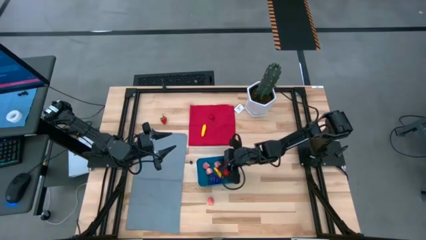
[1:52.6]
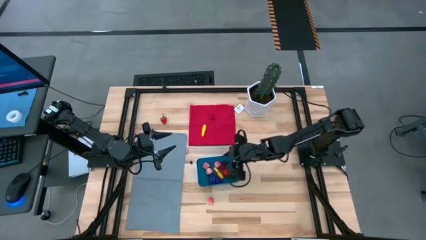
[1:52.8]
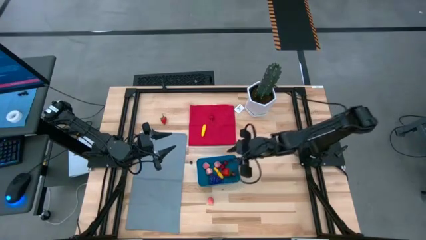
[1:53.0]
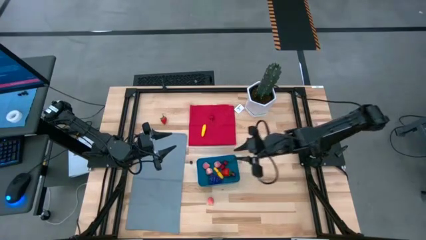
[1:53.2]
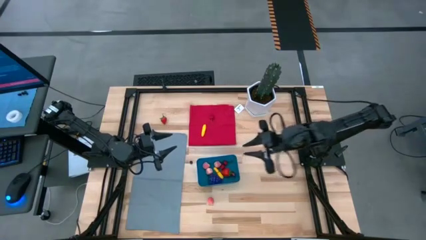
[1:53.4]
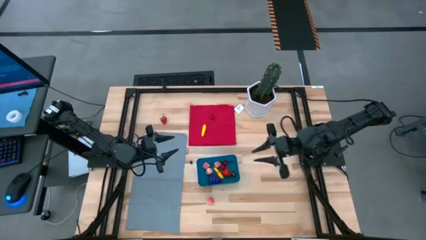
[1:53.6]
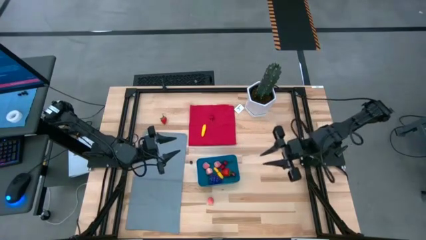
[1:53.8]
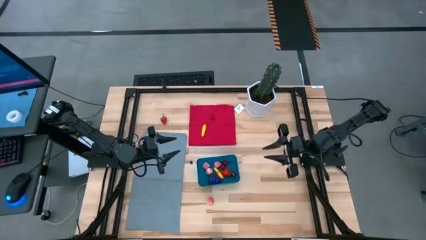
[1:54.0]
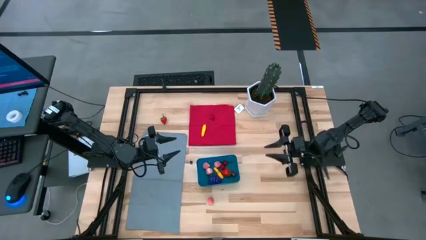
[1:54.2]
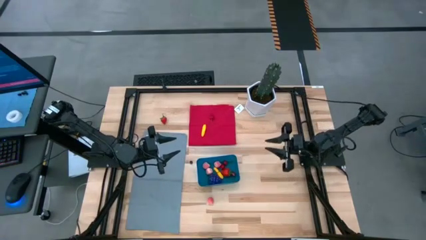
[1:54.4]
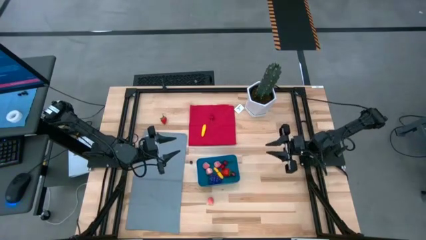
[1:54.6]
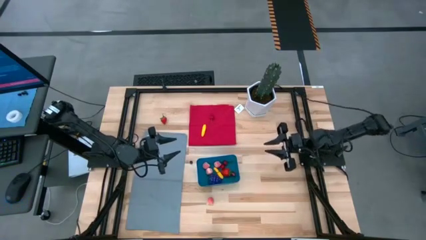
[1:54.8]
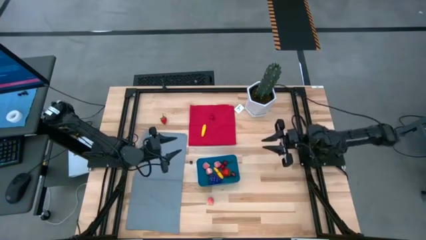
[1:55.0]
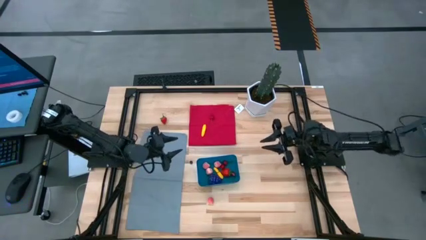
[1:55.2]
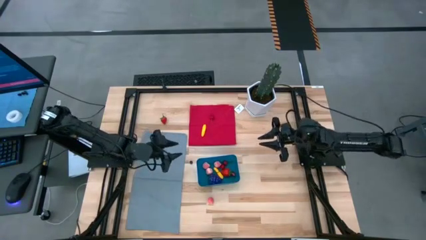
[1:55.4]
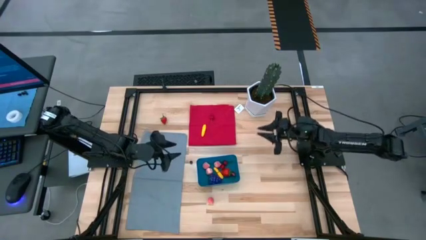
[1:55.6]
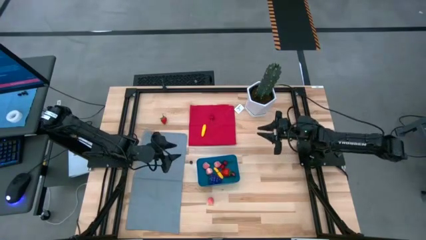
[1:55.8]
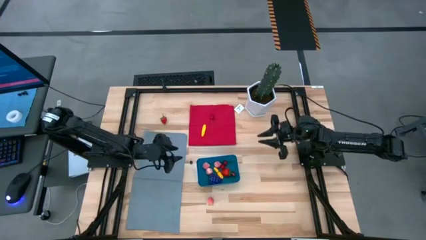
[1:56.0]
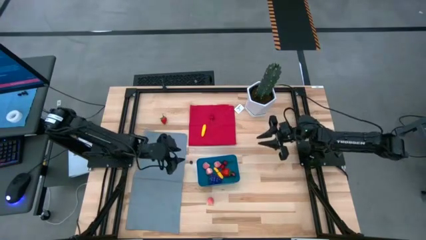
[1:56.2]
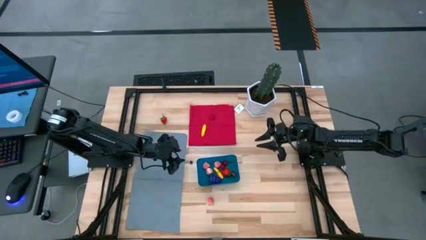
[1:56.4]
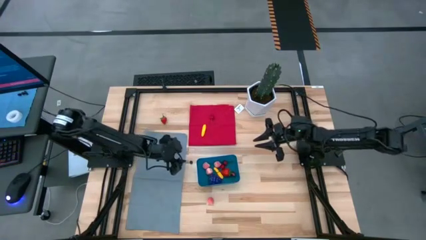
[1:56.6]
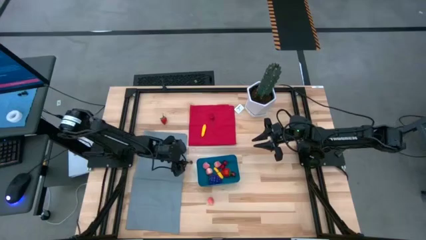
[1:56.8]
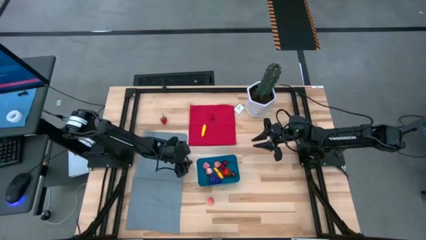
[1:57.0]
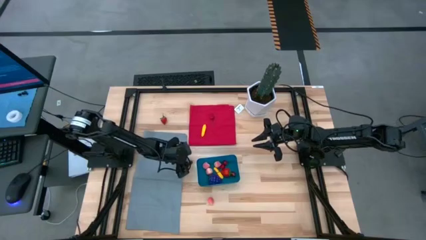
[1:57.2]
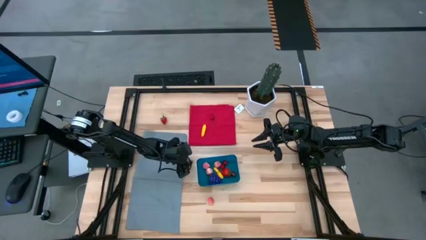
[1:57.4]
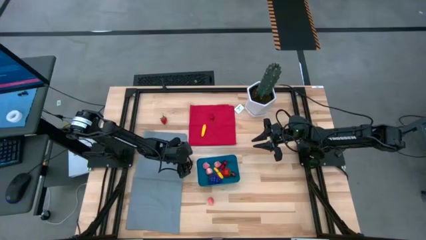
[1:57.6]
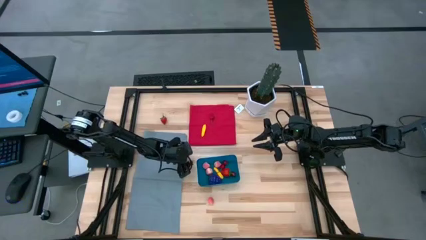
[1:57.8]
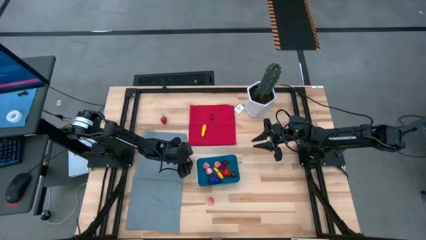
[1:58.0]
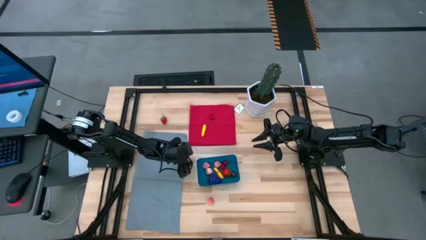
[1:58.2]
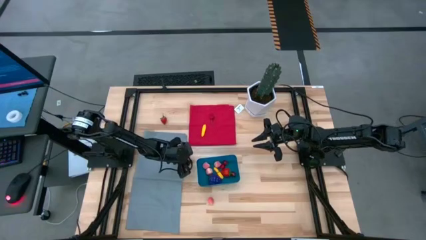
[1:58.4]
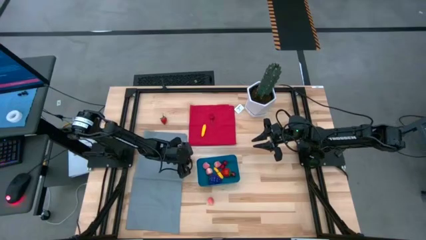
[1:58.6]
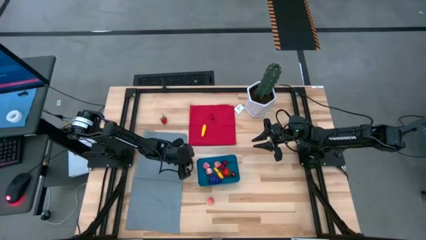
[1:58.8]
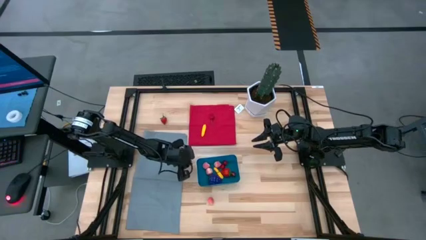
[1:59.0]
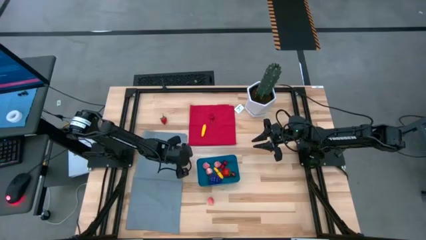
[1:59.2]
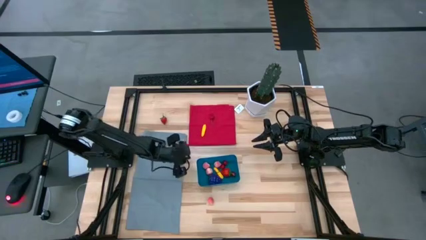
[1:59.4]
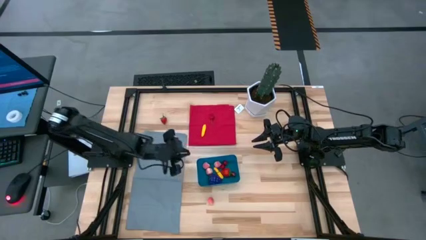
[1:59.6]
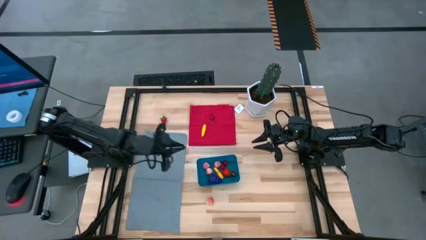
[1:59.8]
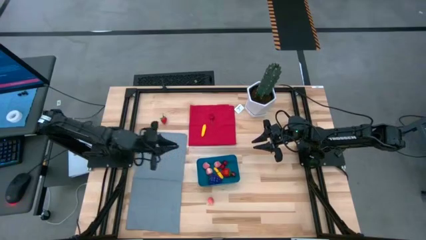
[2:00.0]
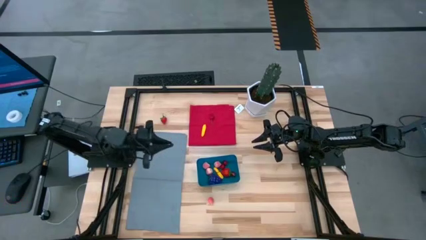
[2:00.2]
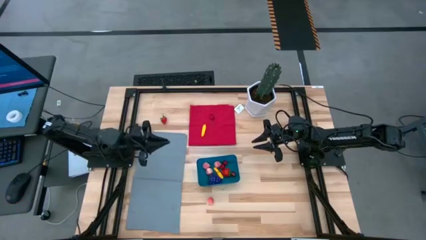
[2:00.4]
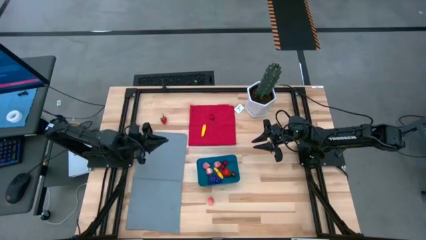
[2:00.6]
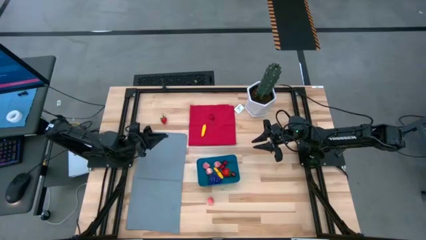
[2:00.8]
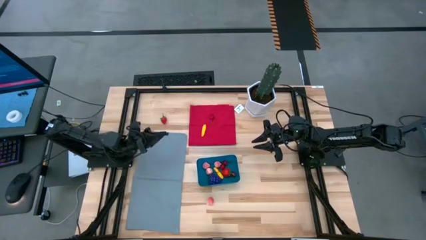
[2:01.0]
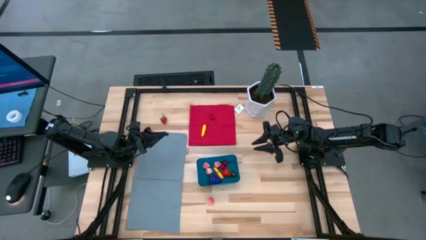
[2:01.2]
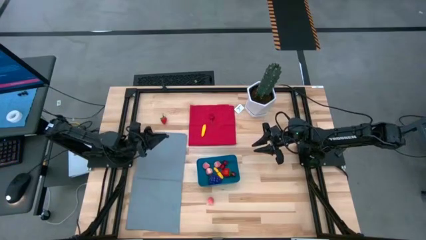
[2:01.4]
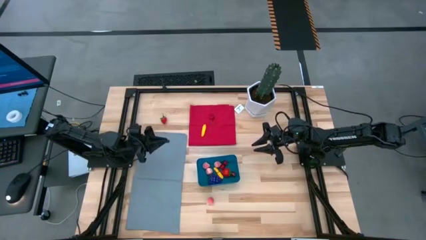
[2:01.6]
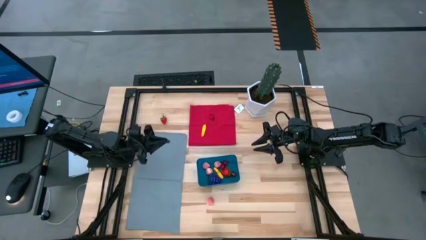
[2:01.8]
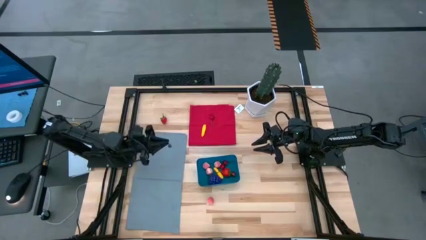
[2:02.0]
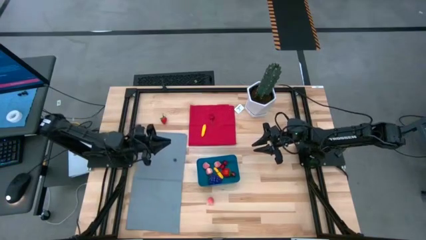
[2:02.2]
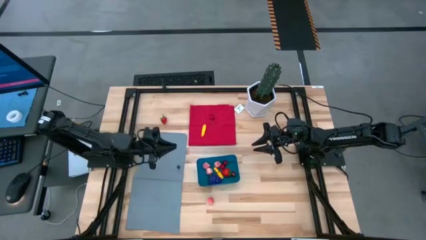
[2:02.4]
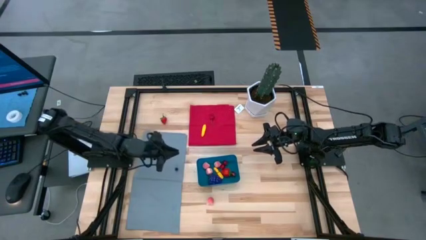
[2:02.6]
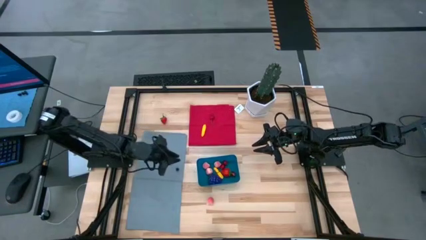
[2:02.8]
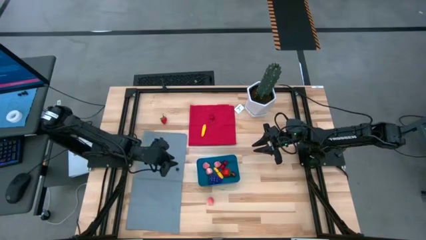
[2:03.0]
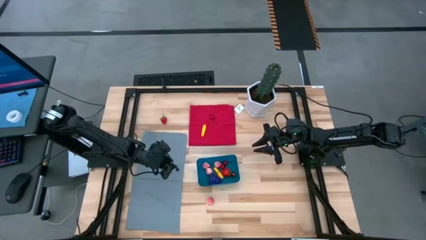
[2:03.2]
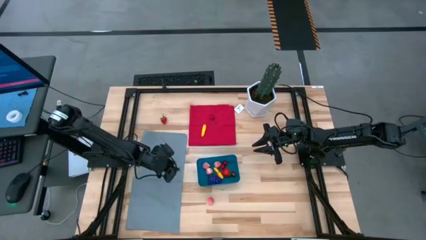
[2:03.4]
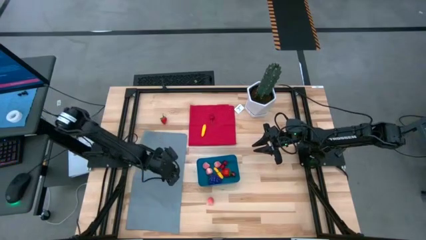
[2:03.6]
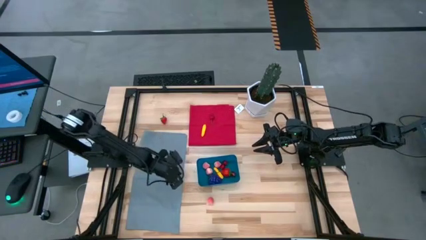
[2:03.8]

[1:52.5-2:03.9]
Task: Pick and placing Produce into tupperware
Put the blueberry into the blue bin
